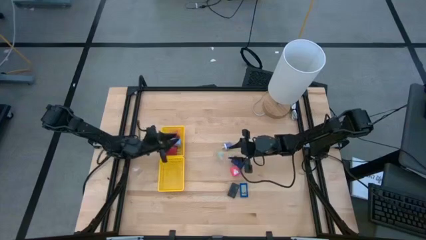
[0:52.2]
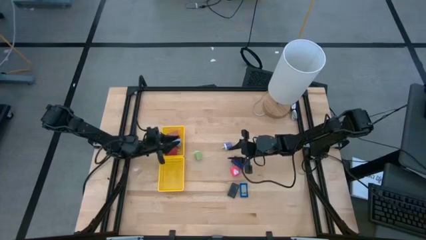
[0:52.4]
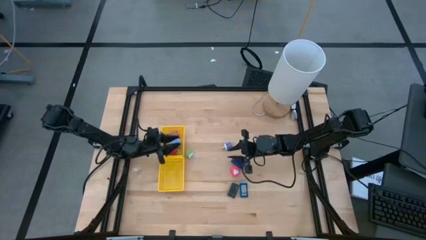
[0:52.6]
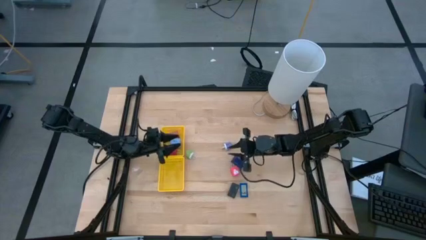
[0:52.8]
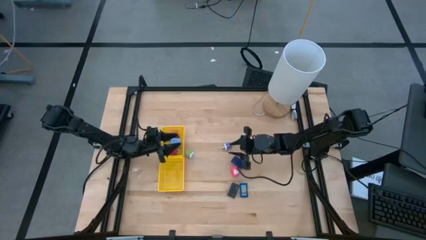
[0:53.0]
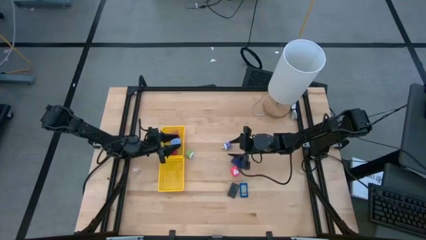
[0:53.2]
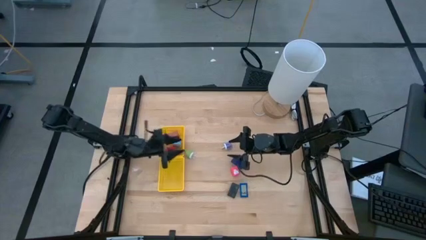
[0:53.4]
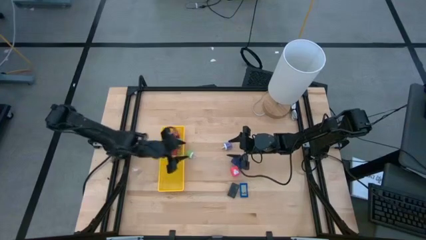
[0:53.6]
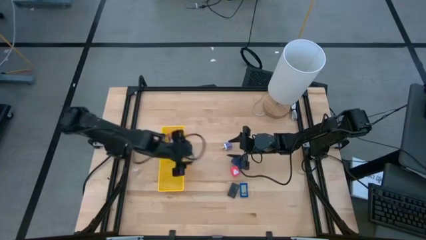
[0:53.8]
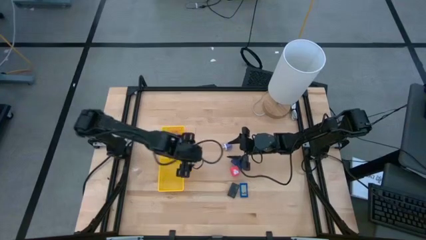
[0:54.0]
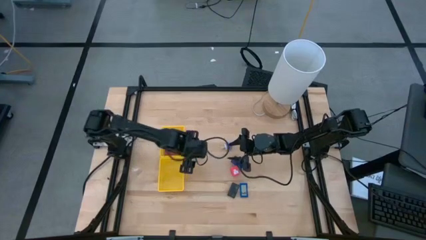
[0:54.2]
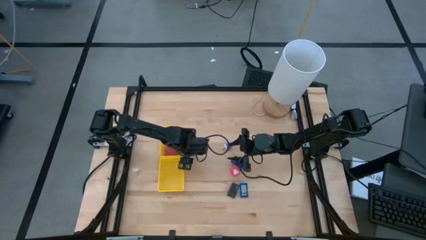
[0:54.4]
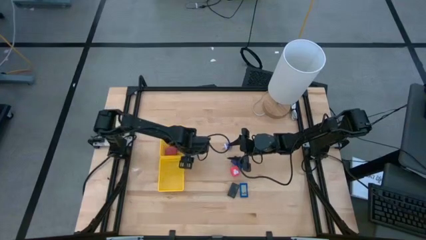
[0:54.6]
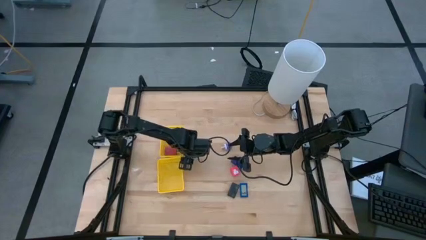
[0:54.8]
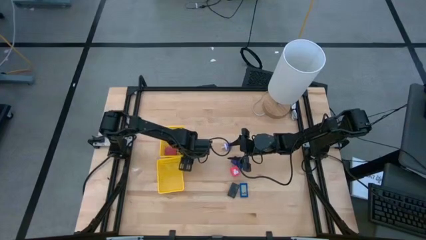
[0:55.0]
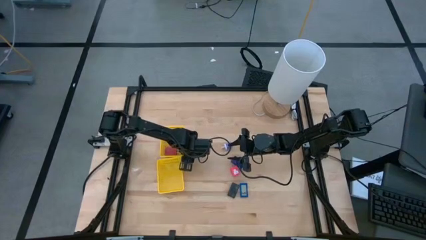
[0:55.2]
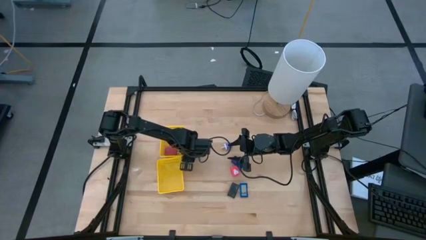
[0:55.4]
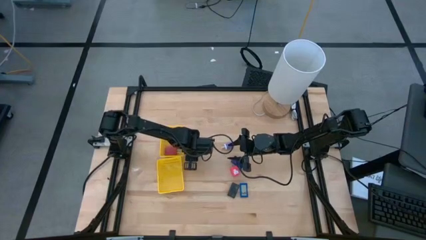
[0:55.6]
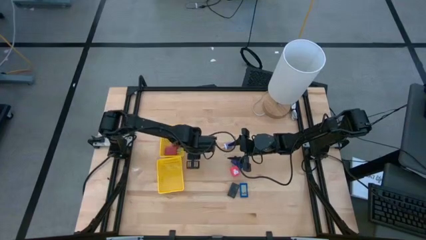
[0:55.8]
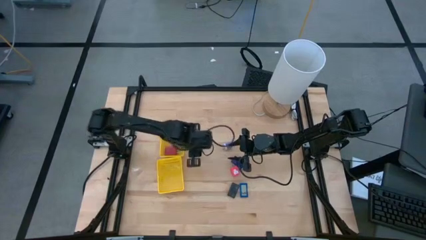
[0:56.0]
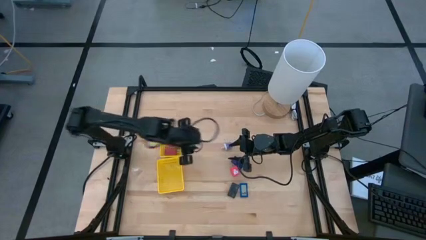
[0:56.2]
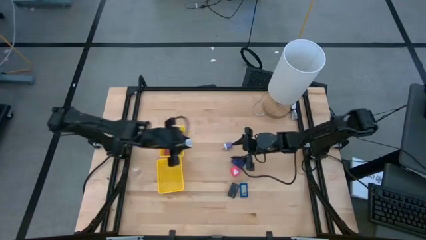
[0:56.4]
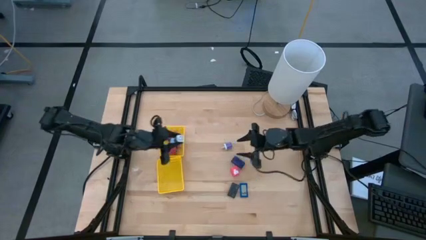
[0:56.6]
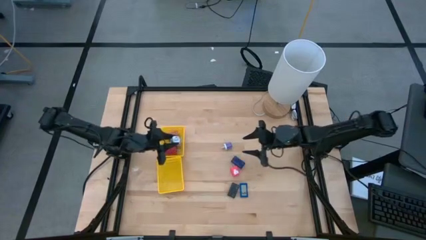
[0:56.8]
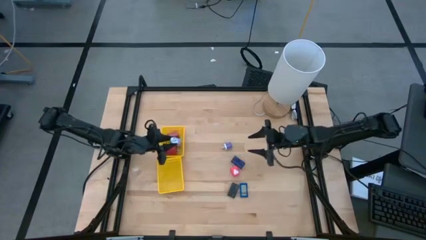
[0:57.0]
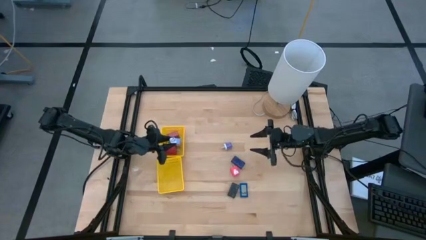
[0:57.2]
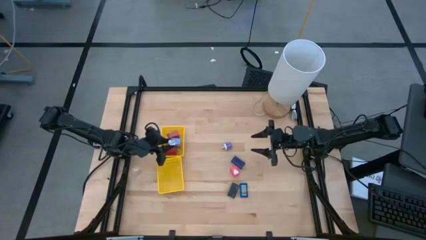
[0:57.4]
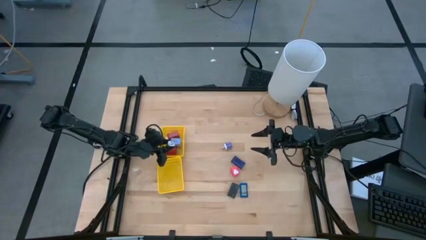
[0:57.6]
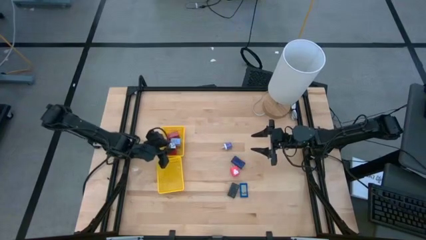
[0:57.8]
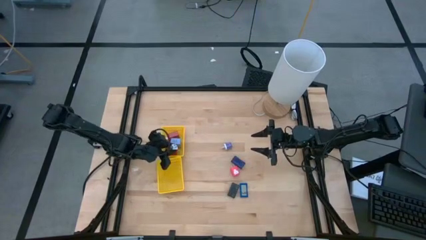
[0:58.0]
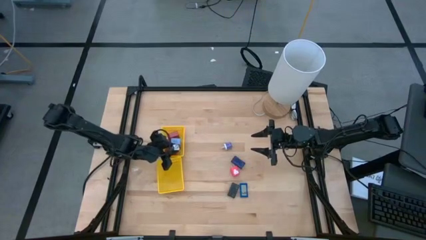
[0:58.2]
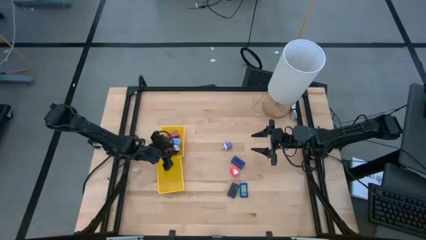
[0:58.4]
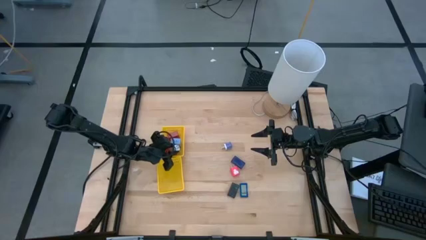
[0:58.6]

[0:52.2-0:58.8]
Task: Pick & Place Office items
Put the green charger adapter into the top yellow bin
